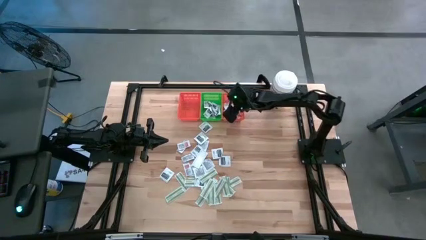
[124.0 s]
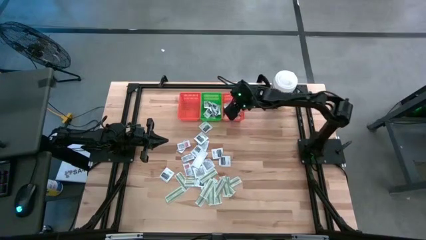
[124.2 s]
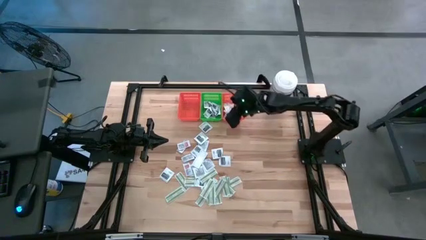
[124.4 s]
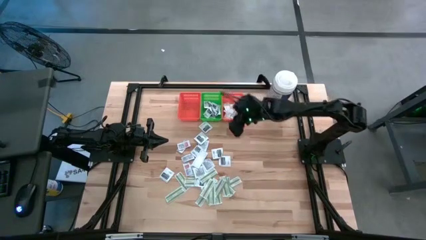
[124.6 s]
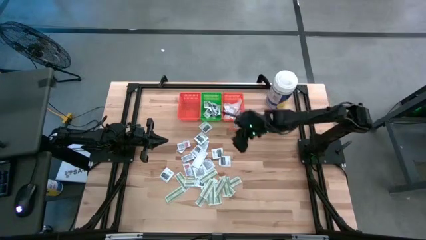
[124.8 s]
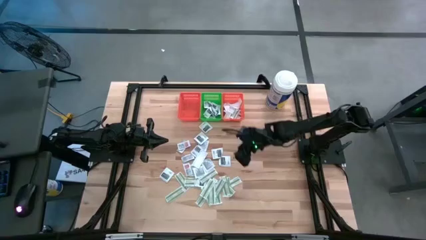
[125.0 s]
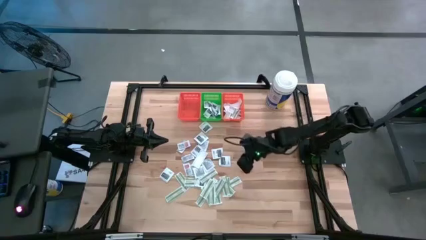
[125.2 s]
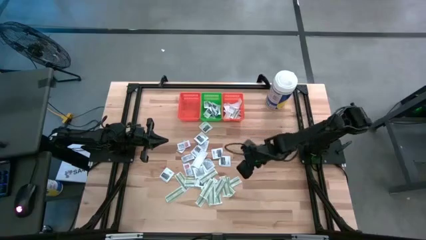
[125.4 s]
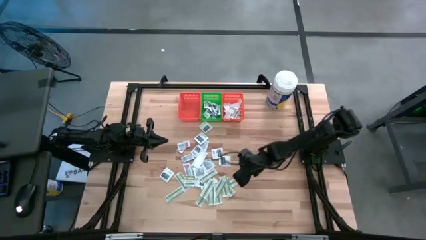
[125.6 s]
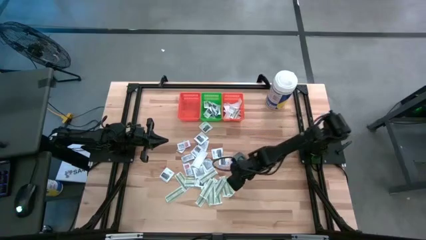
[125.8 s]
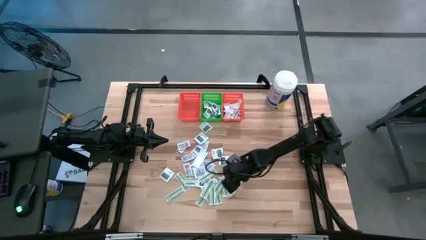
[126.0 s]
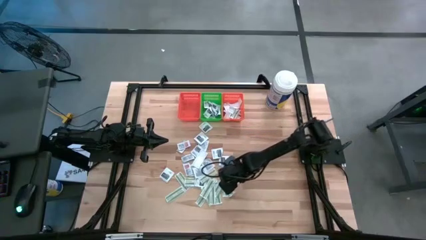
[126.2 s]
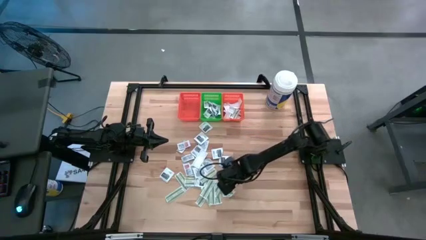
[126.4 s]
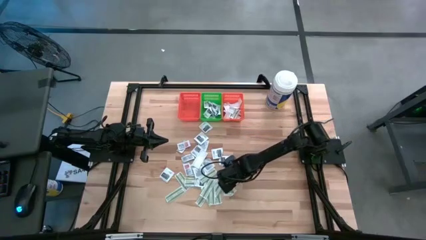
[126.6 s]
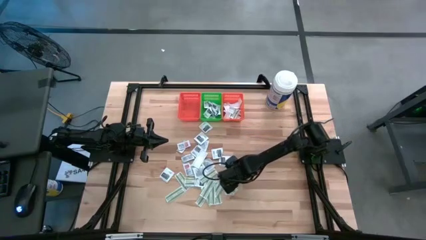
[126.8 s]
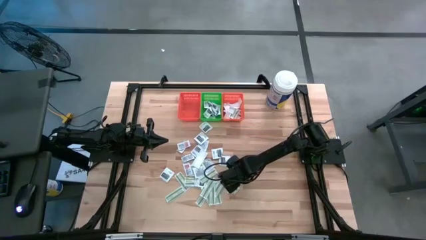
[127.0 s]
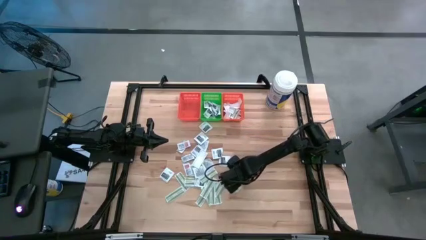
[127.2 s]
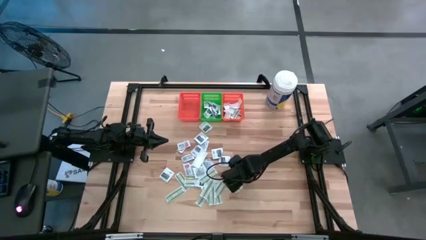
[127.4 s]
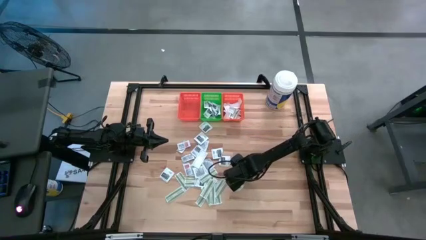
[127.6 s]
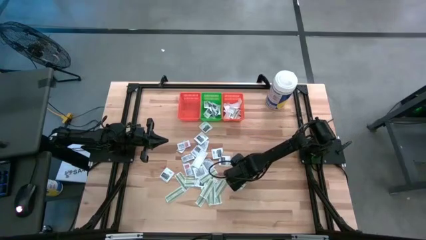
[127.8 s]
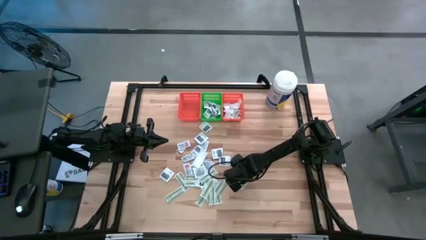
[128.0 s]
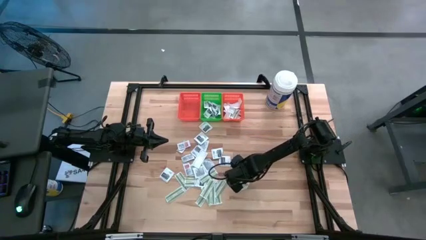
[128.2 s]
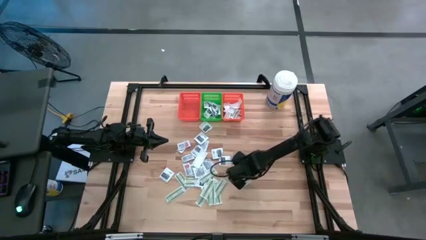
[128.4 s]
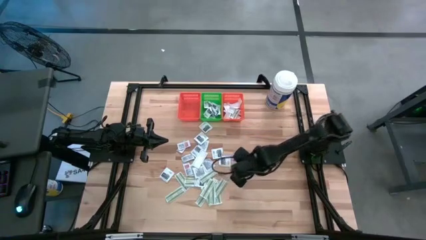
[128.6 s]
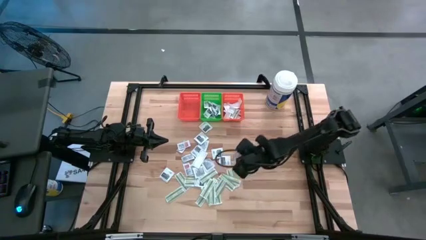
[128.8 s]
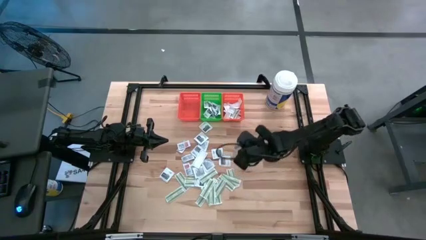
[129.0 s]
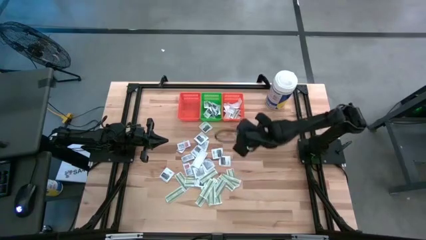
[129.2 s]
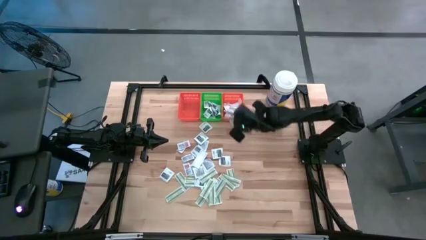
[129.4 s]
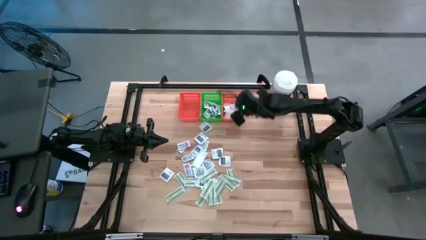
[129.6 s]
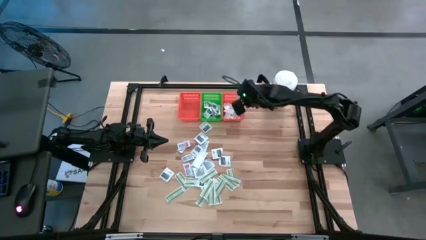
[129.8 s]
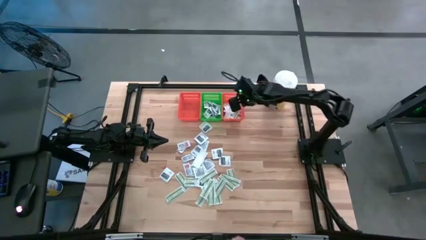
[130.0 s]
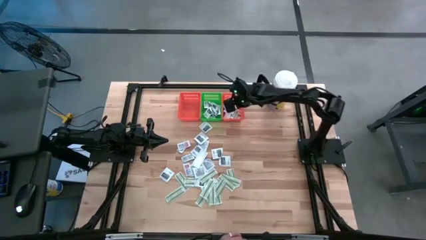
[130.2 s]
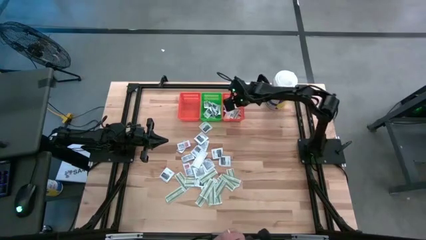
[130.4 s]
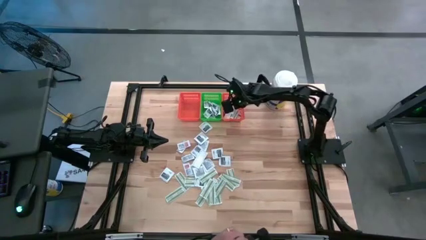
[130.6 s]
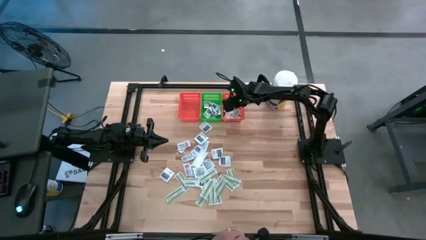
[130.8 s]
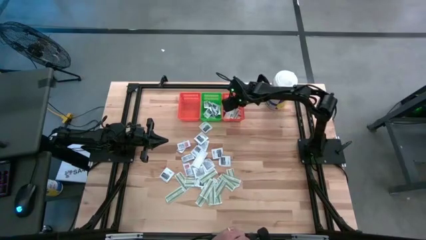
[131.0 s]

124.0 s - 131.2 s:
Task: Pick & Place First Aid Supplies
Put the bandage pack into the right orange bin

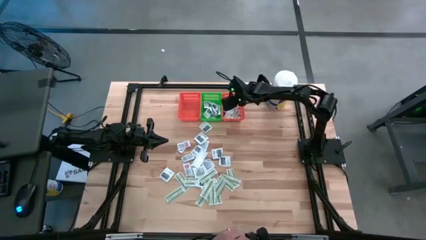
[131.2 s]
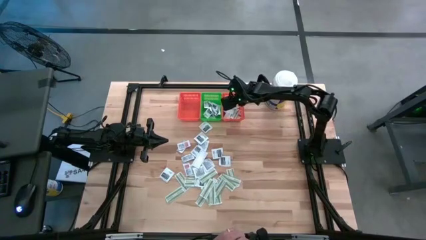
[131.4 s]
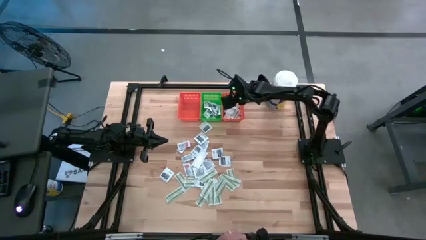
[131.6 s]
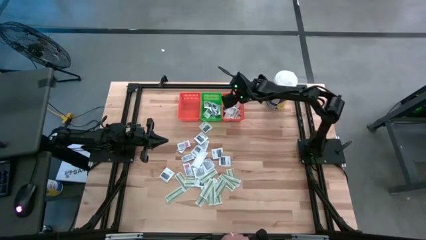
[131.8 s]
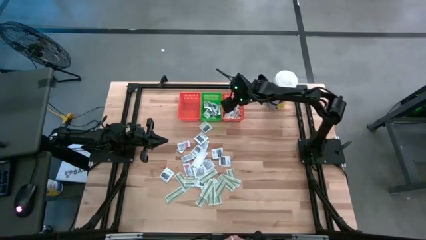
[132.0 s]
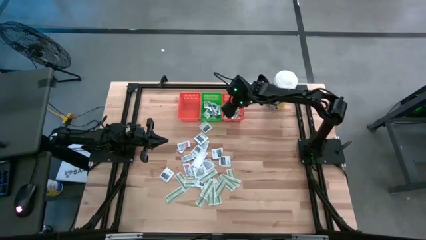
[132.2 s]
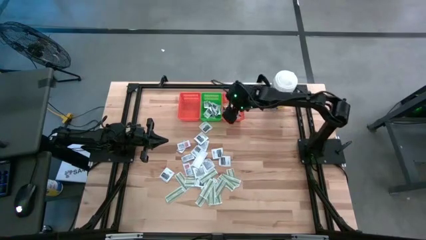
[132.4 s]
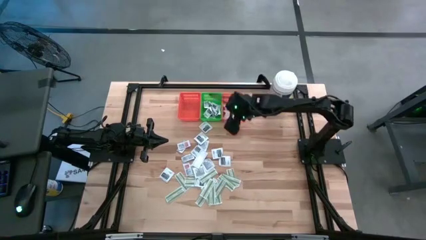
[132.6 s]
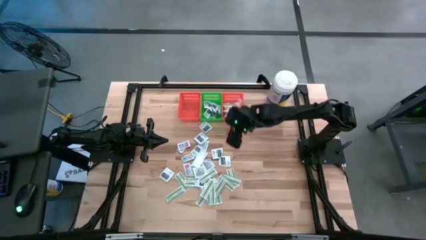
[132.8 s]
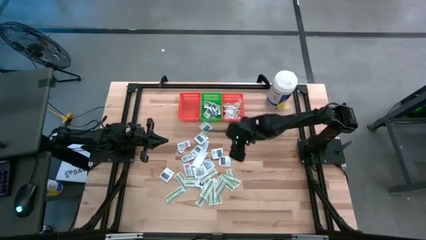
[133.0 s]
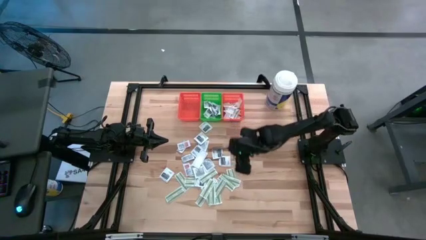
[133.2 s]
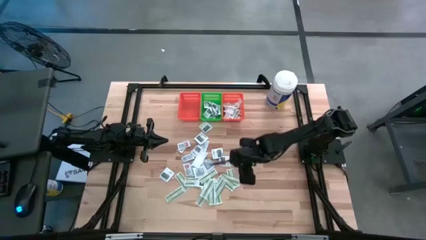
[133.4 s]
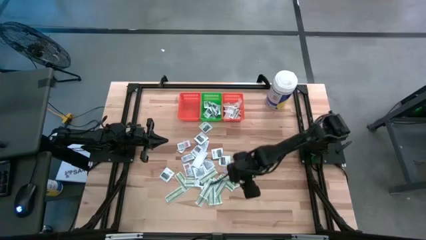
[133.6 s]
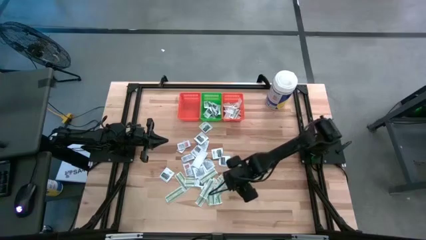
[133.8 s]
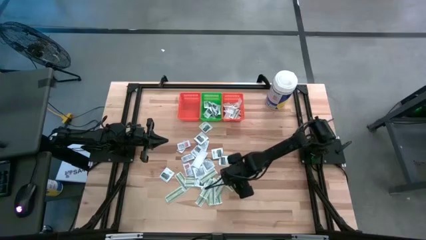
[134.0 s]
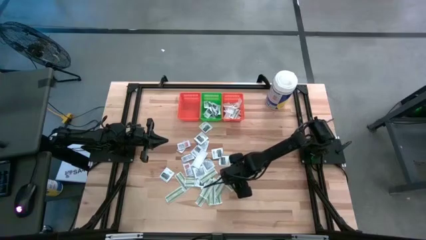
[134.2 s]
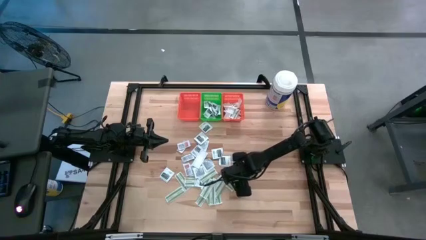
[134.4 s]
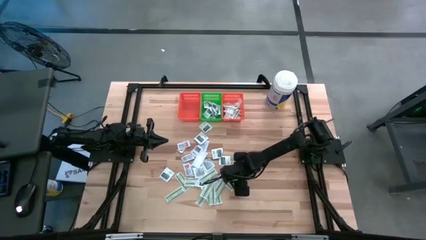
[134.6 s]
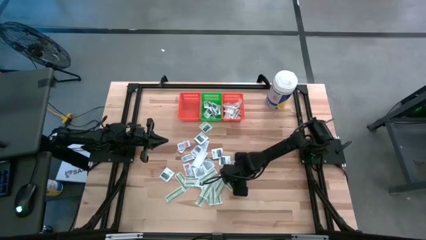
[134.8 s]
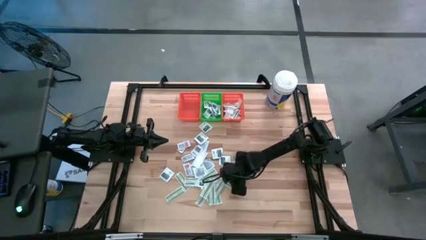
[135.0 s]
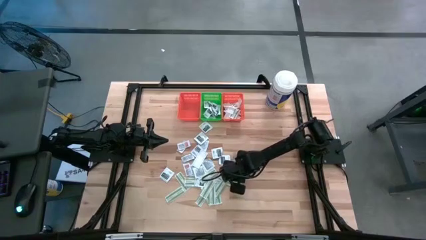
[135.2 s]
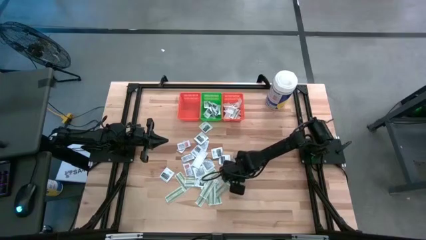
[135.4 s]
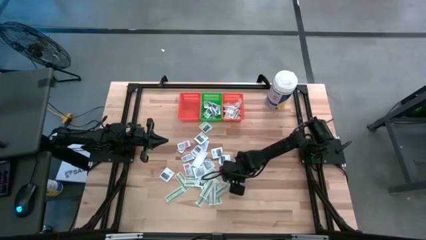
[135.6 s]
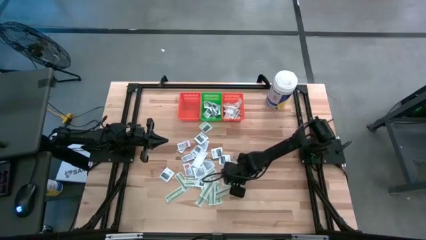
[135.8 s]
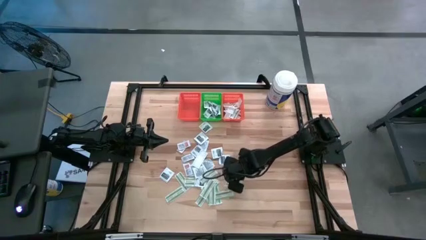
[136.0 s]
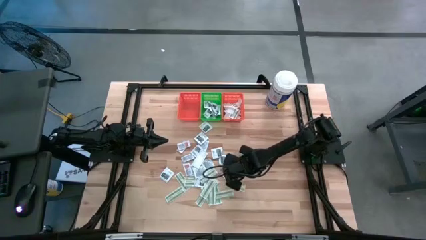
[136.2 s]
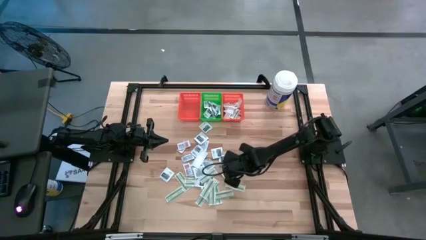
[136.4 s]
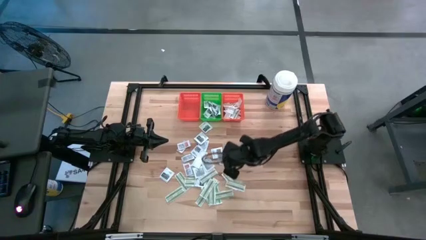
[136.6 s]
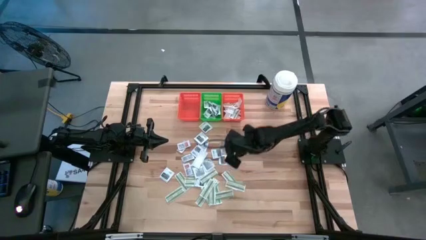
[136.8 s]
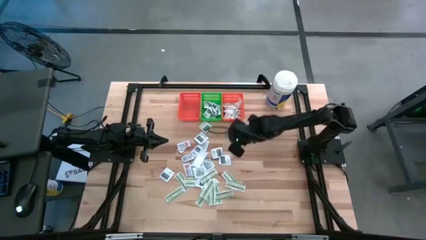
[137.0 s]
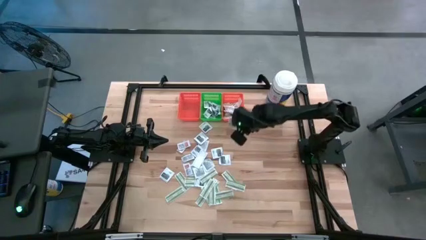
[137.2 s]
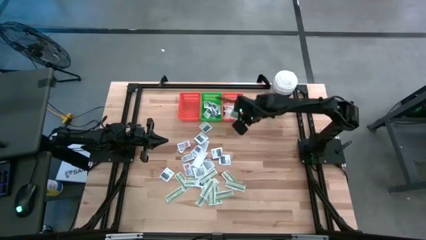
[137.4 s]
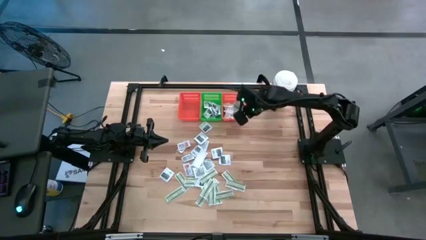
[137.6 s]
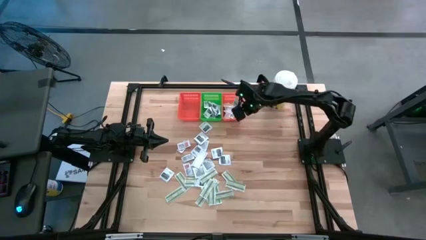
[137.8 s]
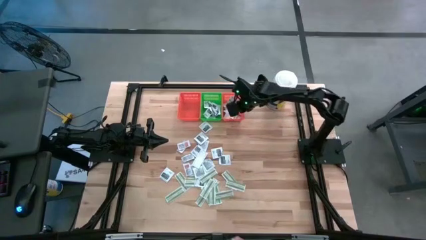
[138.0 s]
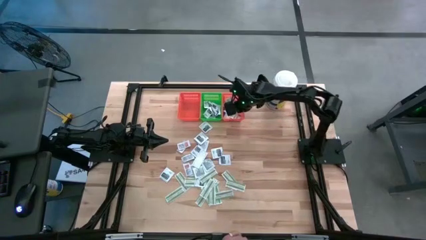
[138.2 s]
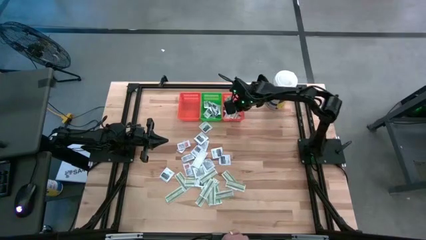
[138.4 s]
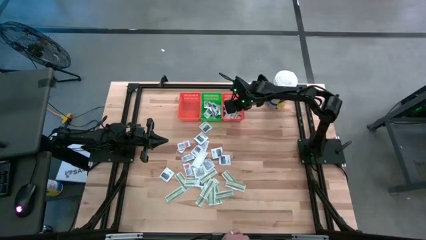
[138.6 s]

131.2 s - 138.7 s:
Put the bandage pack into the right orange bin
